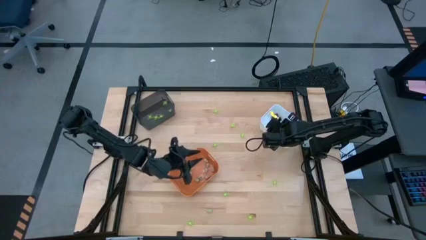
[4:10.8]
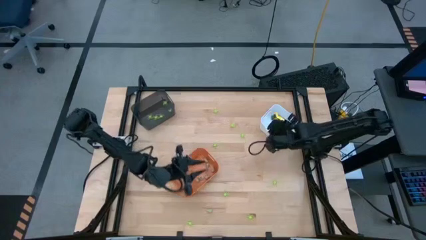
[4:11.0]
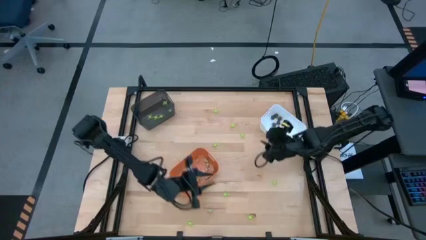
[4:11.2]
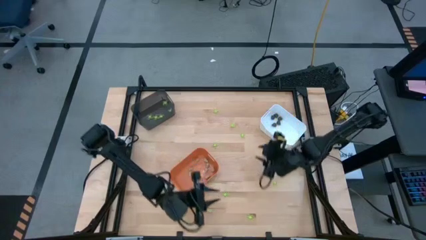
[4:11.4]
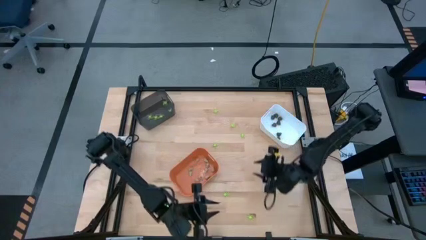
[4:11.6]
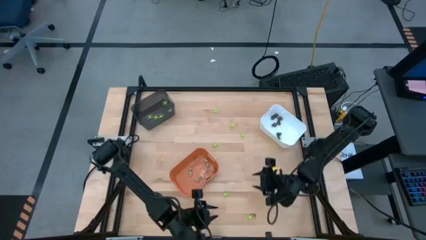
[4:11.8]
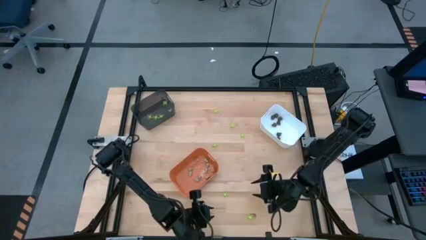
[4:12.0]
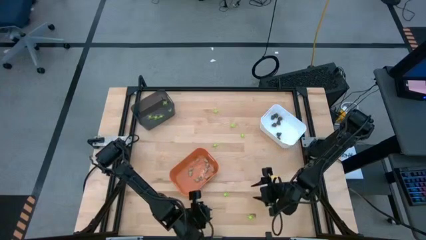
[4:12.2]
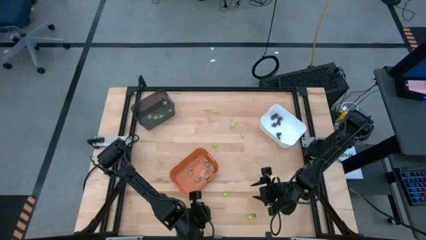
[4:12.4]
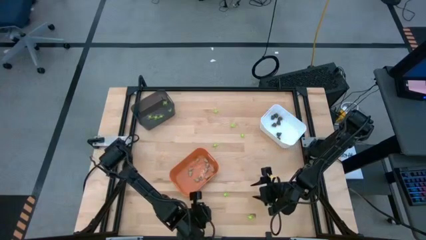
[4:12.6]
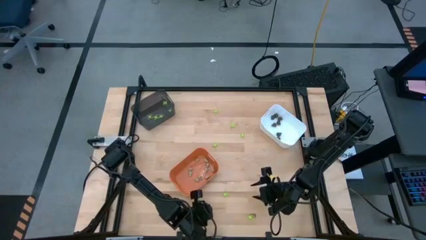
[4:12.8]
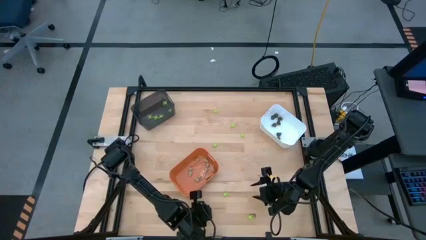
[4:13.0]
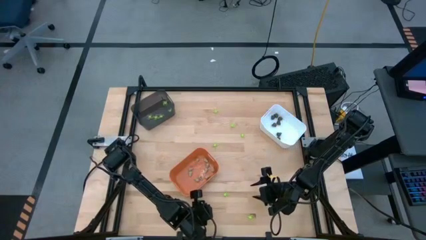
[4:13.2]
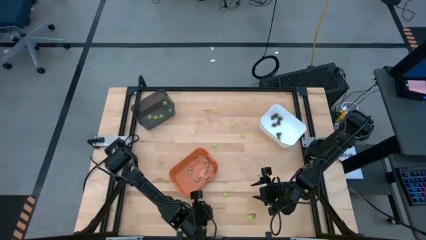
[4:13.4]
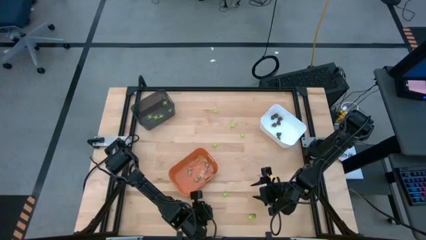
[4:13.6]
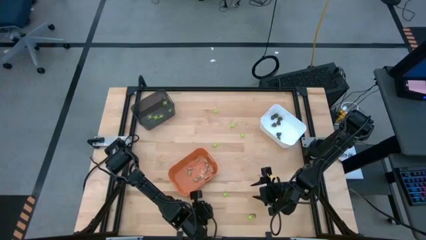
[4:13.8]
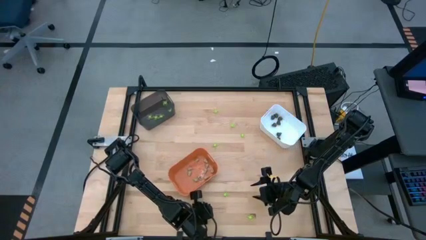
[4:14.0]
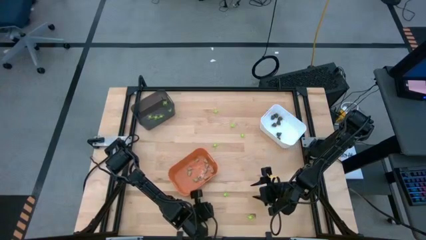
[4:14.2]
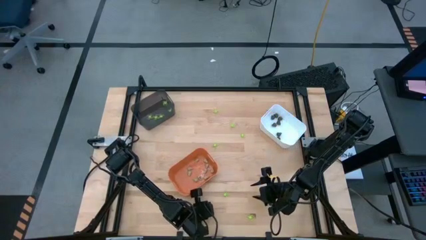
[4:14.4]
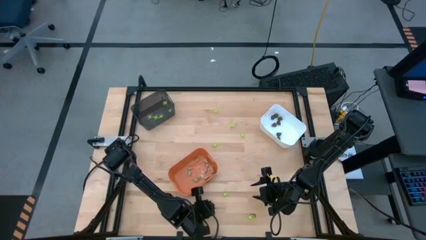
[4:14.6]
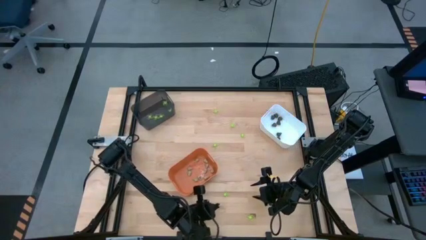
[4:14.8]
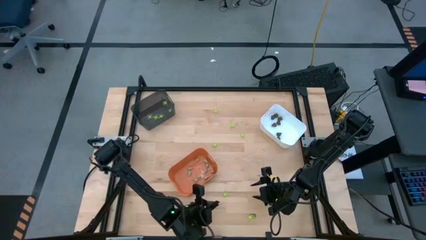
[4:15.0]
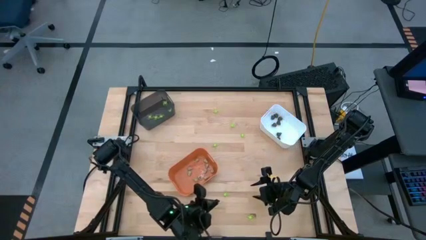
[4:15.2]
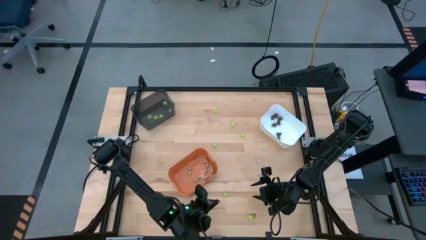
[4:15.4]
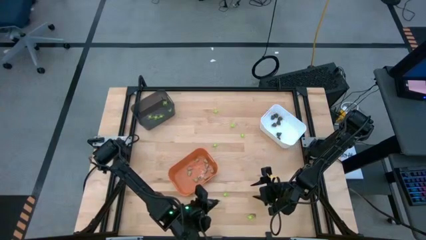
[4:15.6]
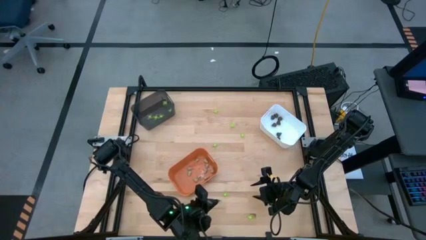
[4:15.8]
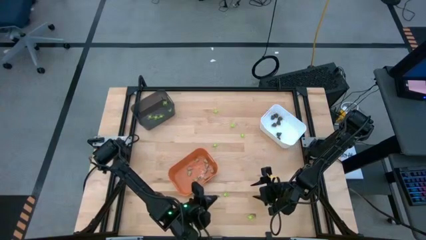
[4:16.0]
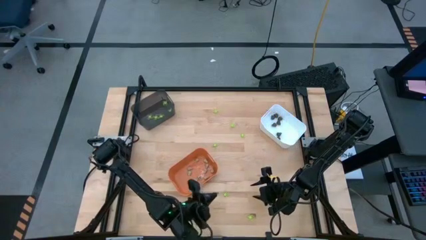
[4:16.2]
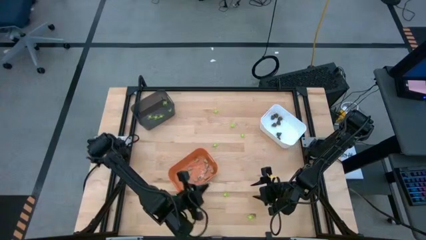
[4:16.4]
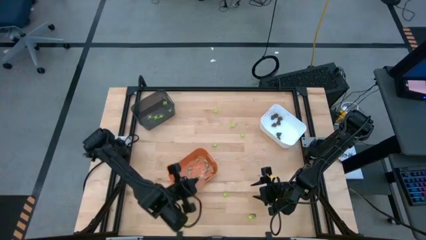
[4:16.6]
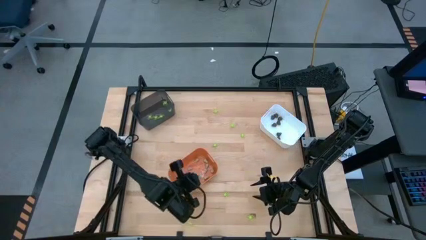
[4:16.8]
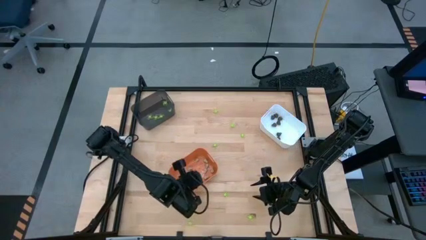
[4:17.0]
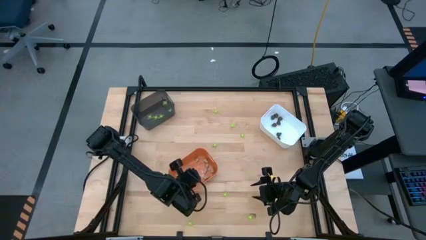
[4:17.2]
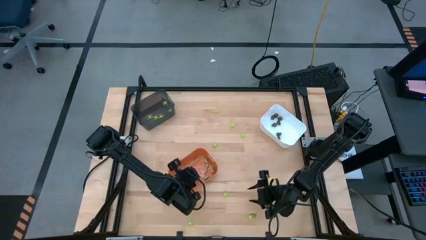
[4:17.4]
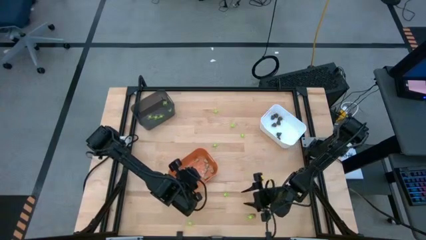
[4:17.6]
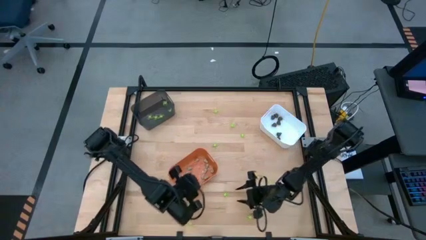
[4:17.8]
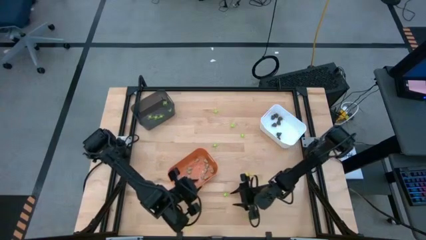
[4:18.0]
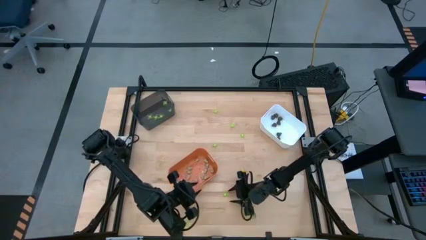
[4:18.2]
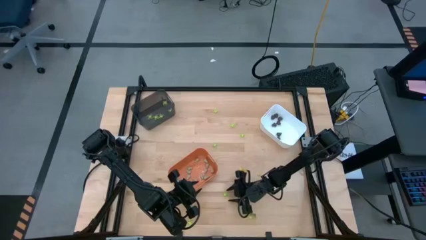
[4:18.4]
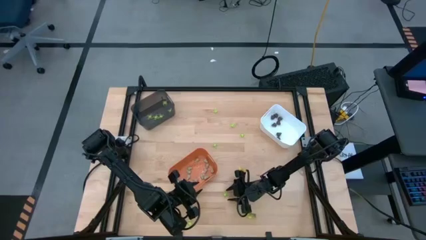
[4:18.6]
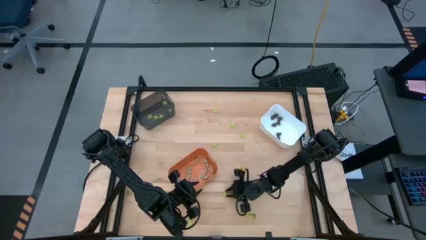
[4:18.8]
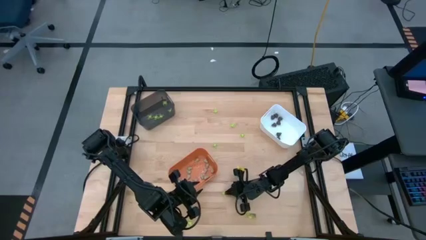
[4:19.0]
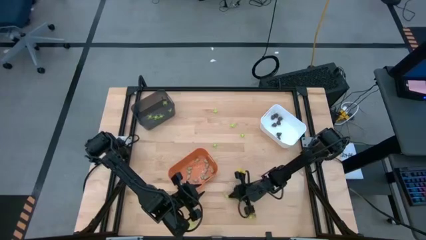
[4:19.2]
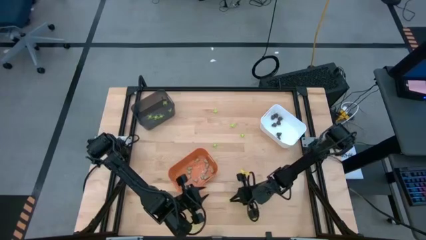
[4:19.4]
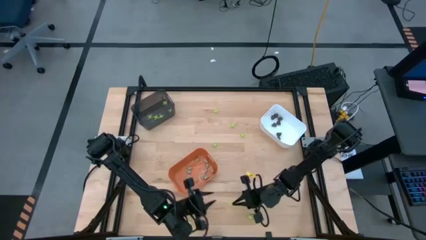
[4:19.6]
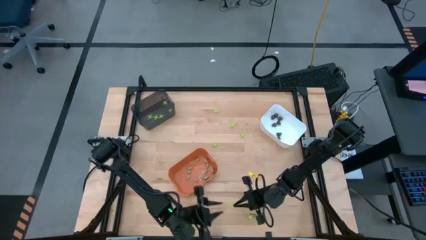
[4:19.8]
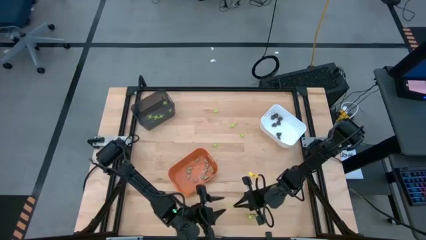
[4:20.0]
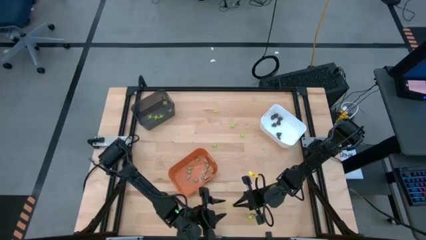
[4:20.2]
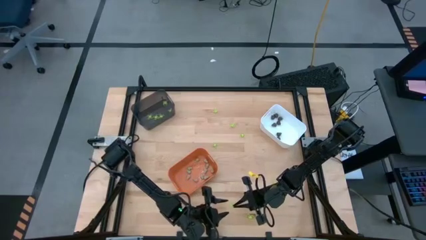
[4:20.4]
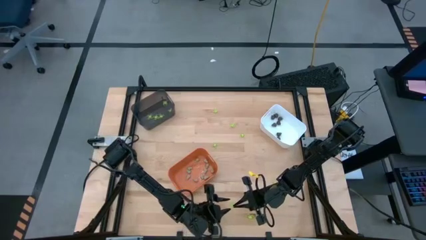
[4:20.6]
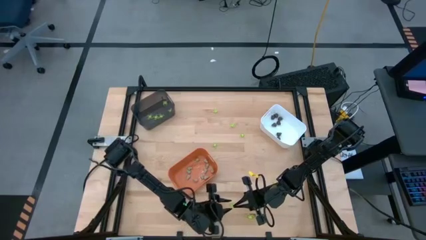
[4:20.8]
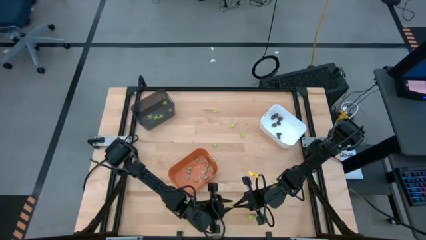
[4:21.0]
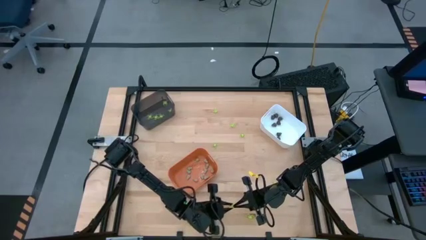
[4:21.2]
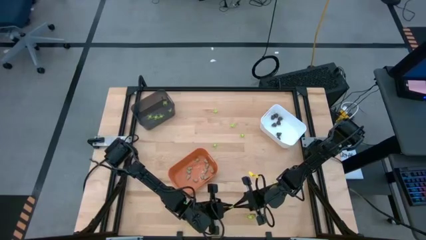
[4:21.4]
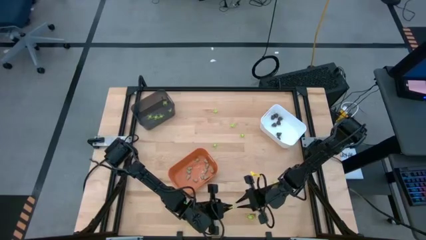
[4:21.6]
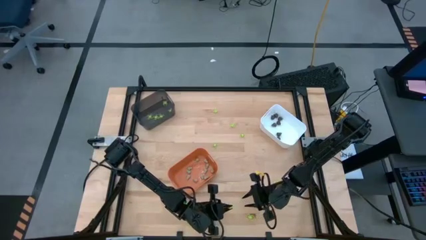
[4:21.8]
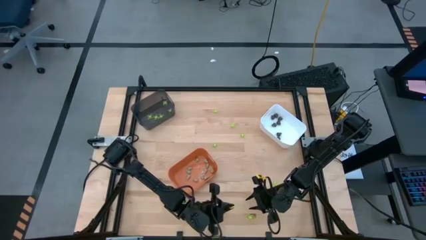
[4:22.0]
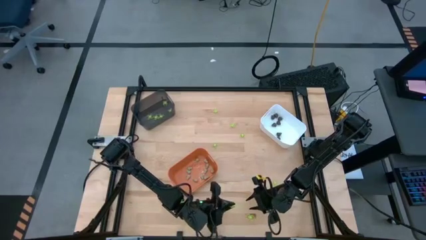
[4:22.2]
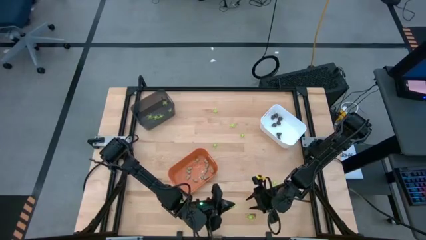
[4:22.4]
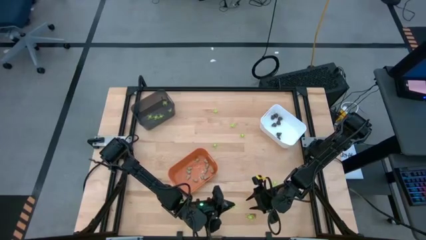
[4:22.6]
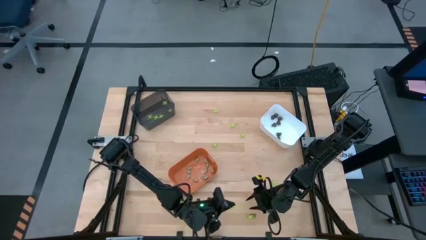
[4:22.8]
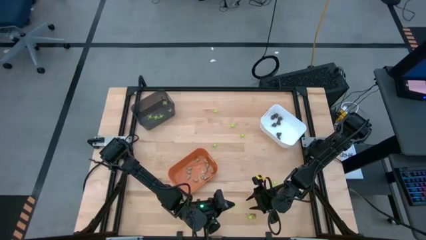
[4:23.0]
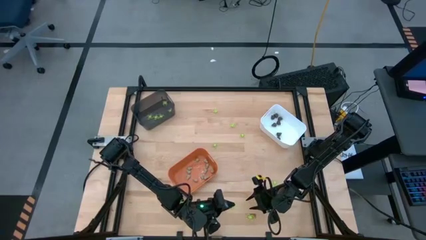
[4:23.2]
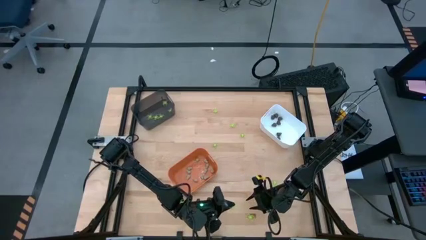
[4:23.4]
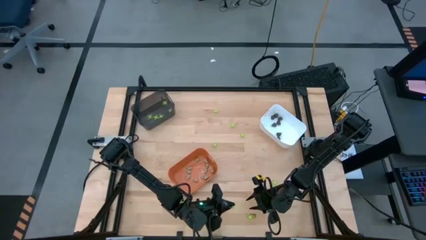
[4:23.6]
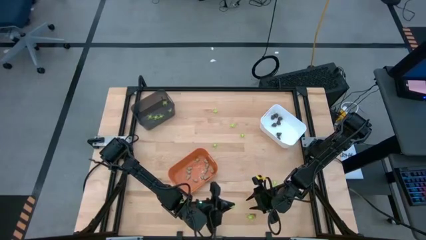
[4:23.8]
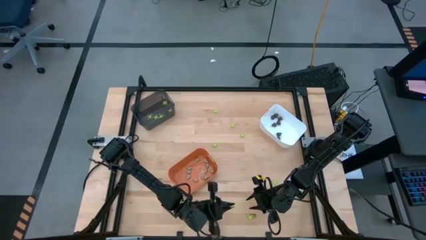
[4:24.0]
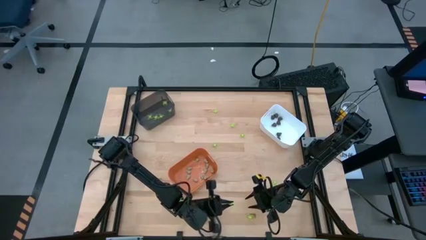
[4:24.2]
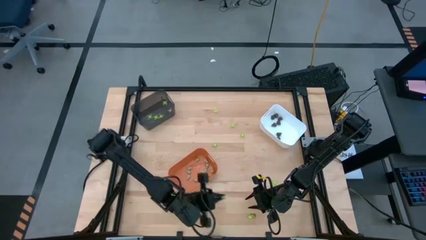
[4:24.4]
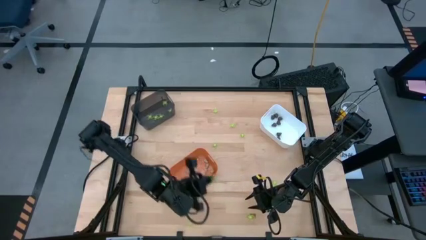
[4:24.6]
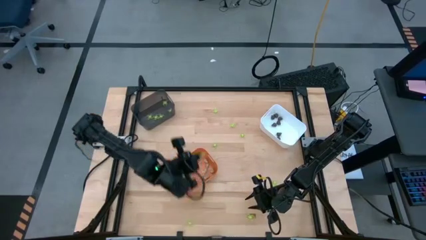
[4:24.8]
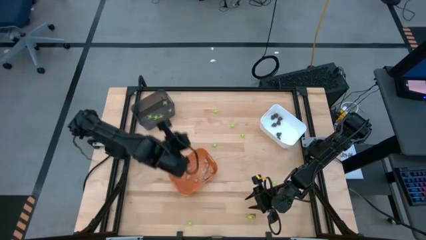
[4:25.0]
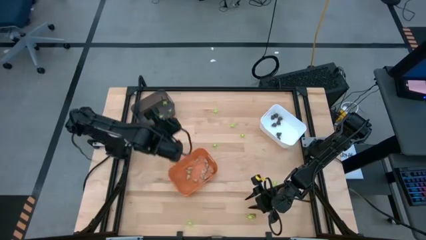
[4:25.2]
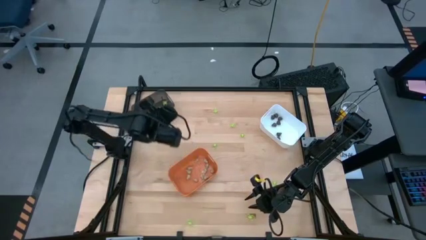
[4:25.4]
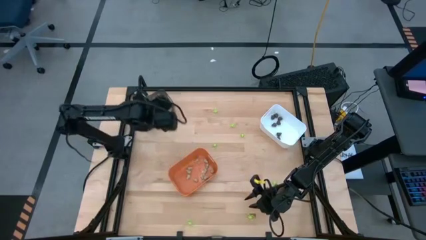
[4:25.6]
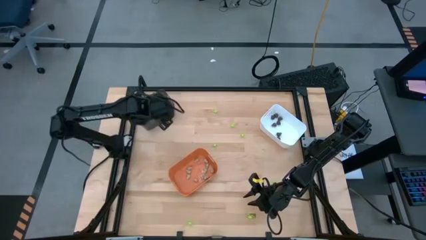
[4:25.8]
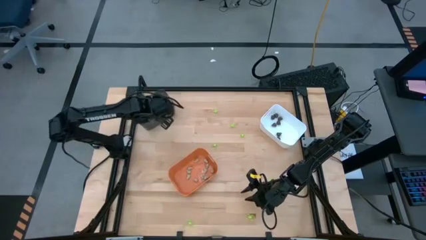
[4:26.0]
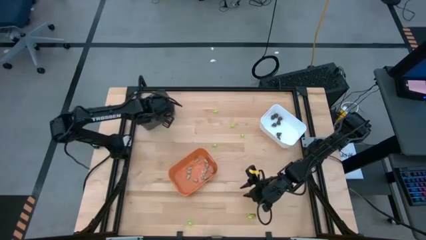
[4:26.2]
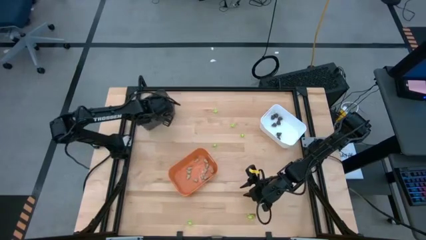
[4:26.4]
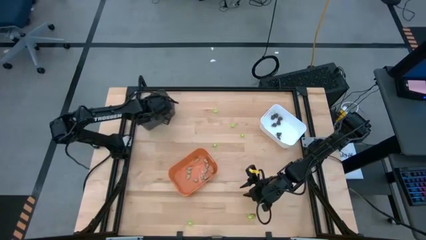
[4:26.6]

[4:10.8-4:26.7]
Task: Sort Halloween decoration
Put the green spider toy into the black bin
